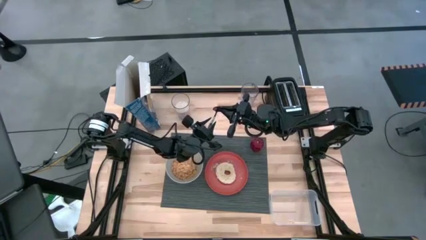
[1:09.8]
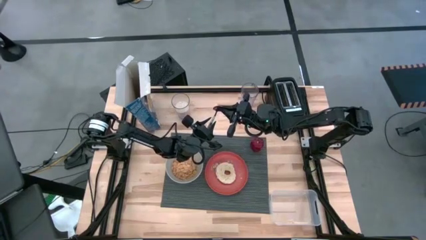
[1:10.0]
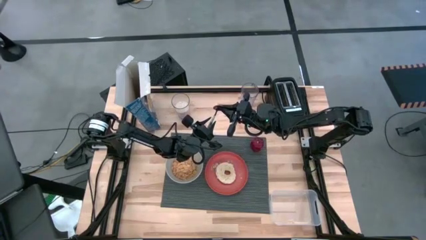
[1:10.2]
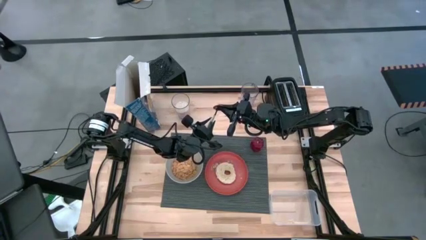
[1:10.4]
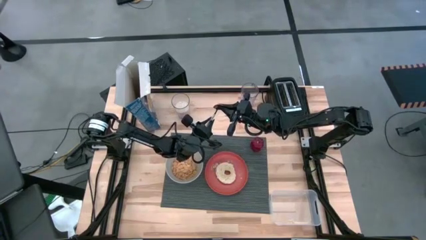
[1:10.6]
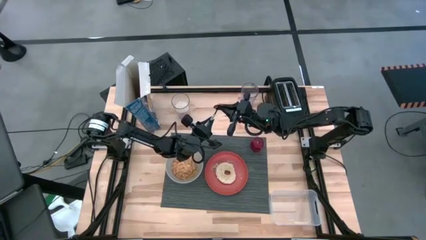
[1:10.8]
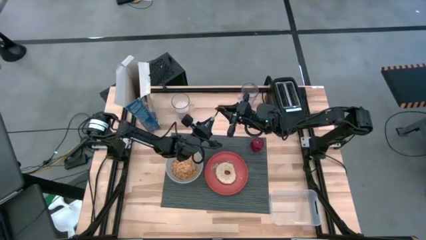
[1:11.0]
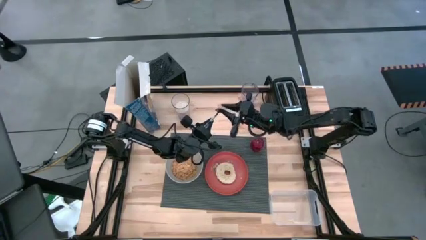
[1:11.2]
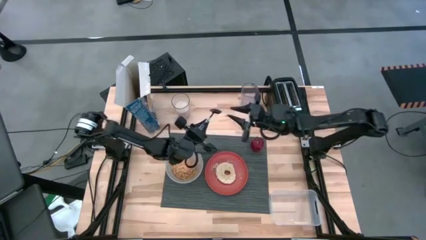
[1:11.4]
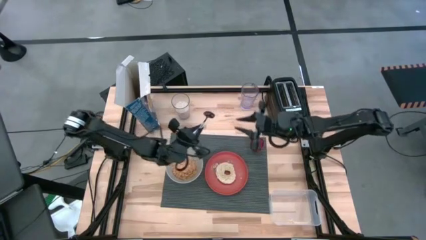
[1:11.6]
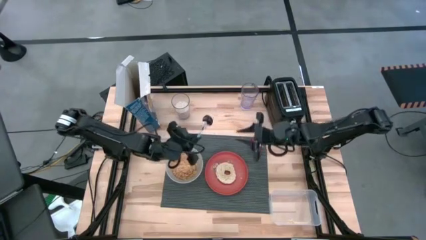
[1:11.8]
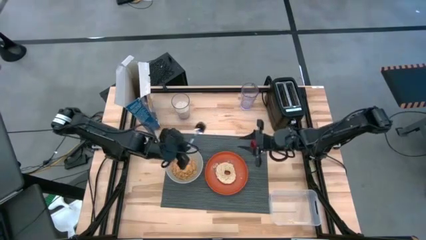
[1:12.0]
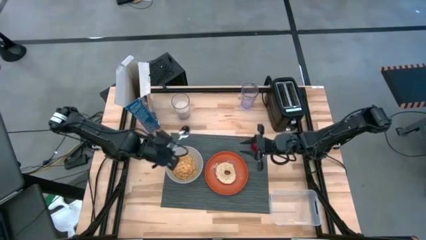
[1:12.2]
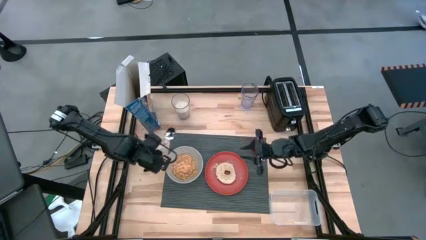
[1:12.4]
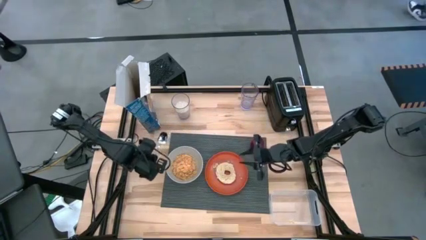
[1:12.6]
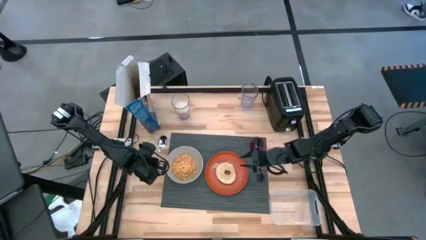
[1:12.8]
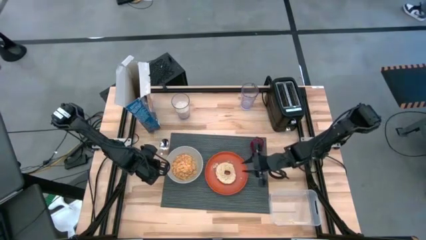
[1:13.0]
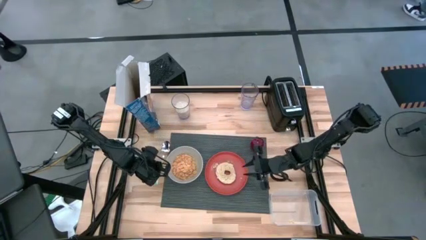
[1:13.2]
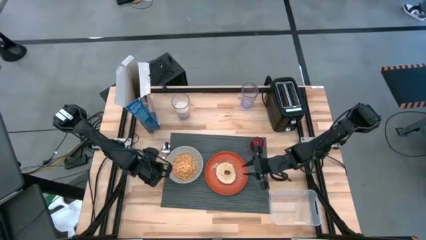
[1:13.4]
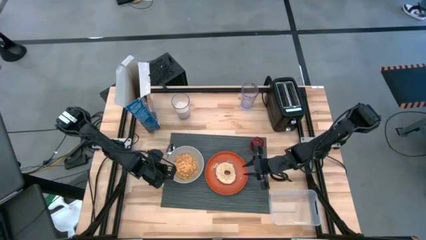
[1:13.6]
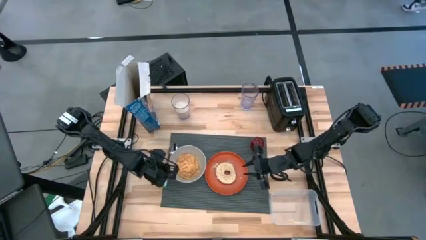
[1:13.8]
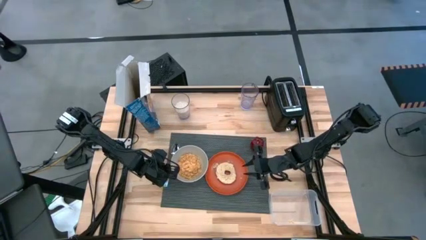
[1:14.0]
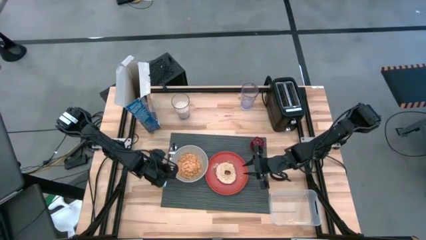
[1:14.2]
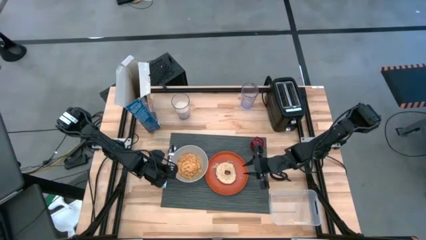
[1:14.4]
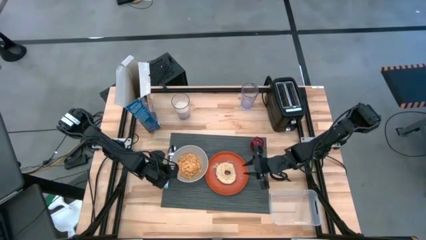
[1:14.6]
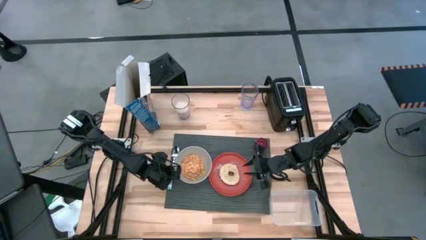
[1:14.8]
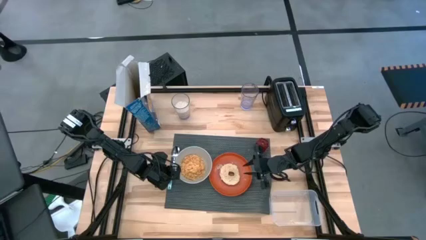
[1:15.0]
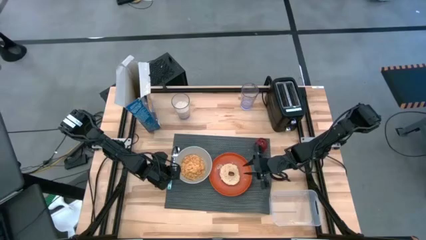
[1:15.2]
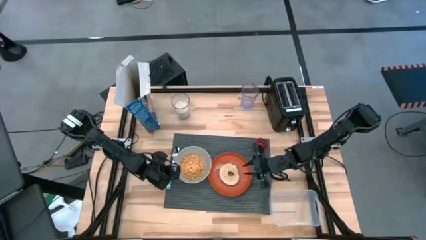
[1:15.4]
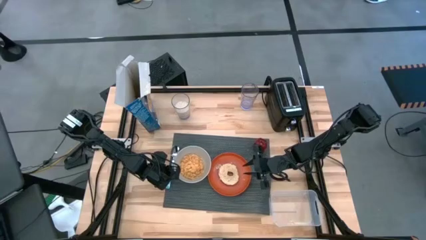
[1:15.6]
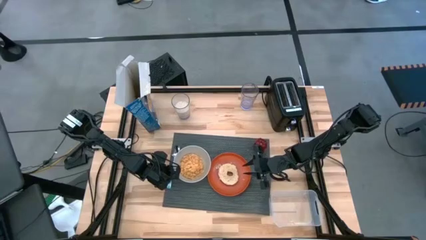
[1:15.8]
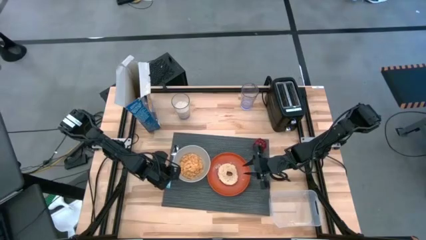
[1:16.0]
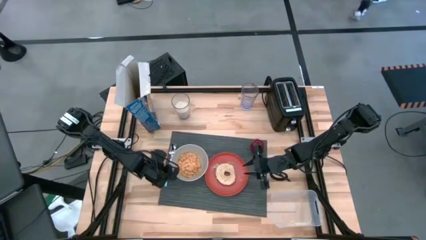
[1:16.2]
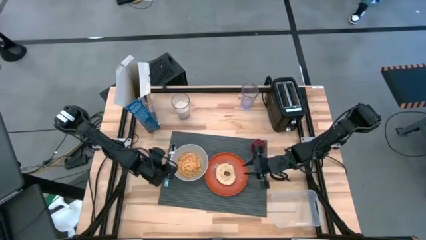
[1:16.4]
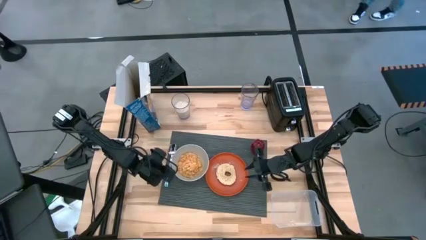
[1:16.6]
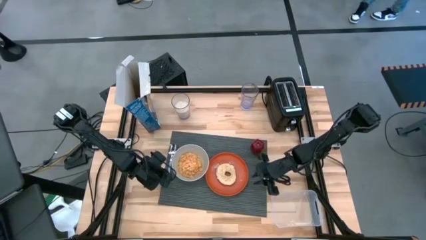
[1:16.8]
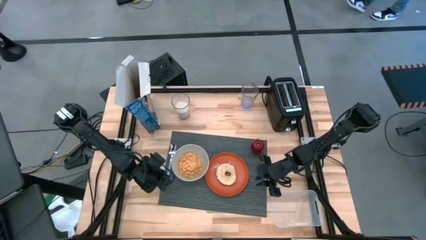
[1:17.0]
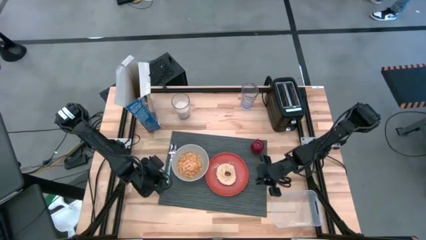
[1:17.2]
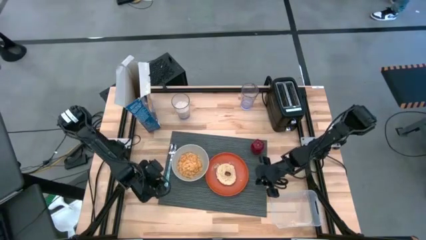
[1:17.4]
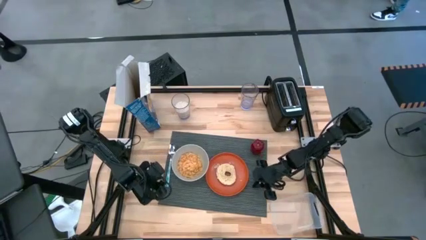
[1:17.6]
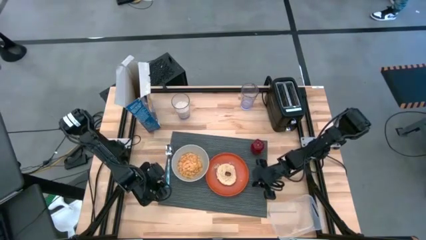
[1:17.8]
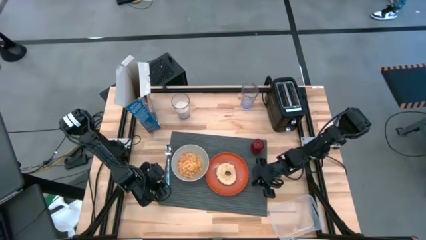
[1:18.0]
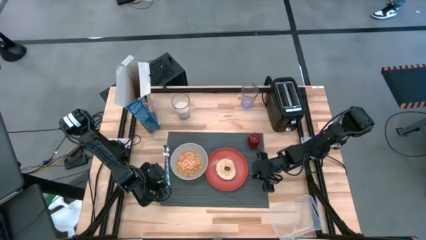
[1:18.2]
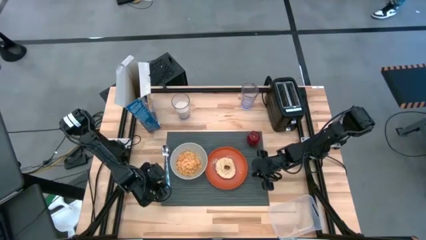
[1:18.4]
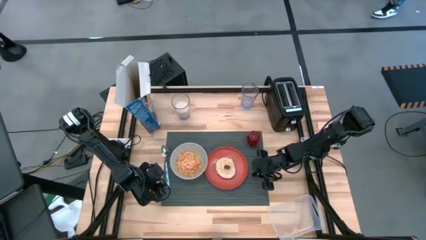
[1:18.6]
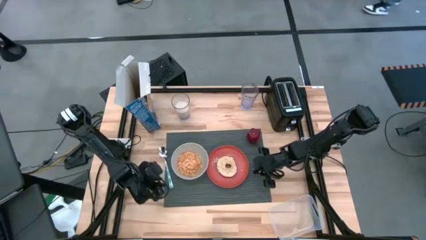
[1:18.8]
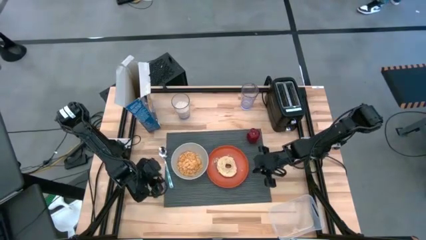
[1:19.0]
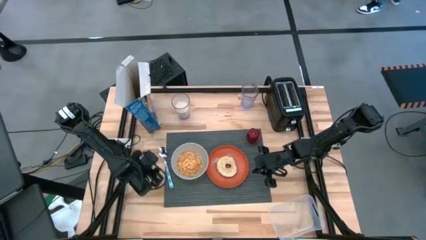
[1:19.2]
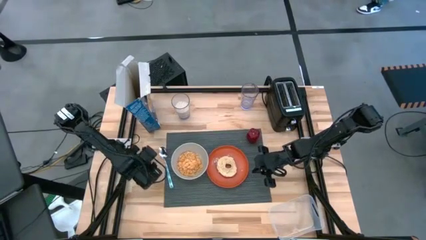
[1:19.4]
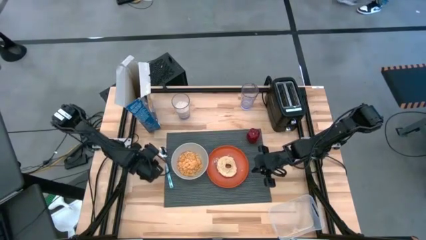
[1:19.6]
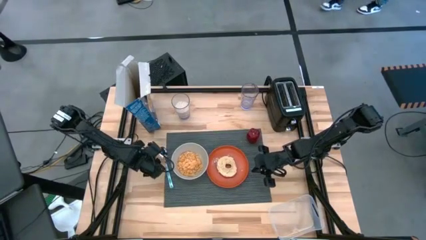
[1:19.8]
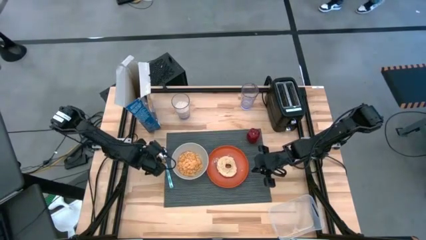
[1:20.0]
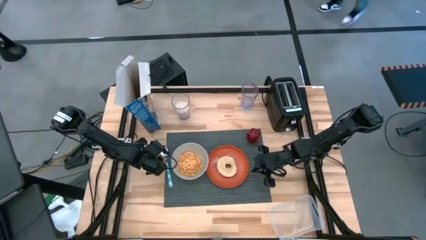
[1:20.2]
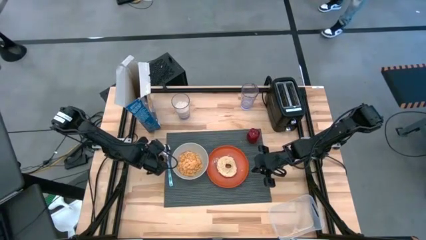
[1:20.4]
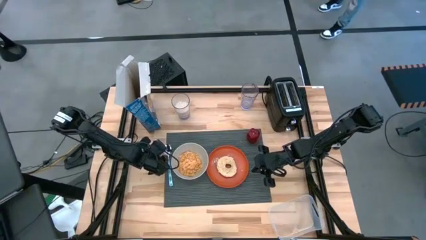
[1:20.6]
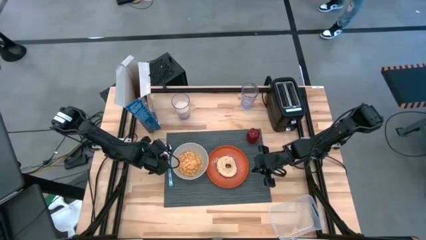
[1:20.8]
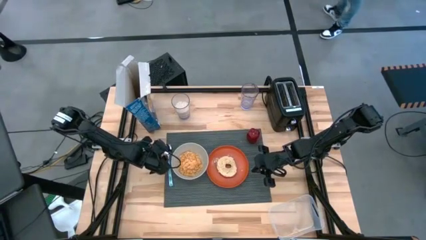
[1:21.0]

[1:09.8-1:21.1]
Task: Arrange a breakfast setting
Put the spoon beside the bowl

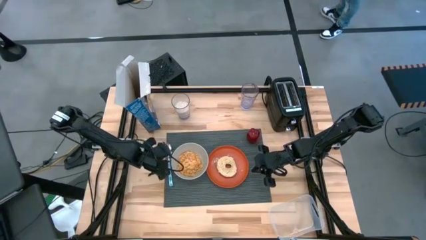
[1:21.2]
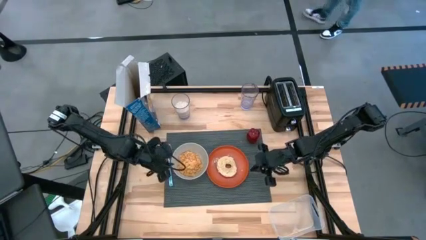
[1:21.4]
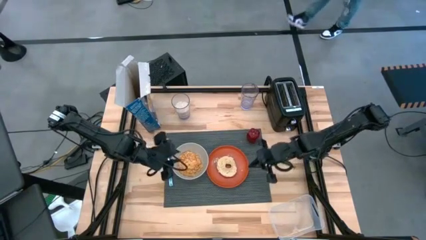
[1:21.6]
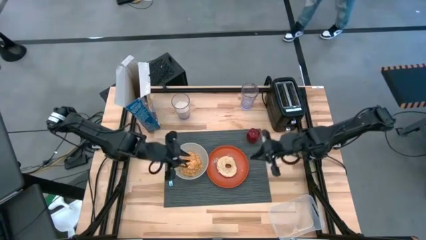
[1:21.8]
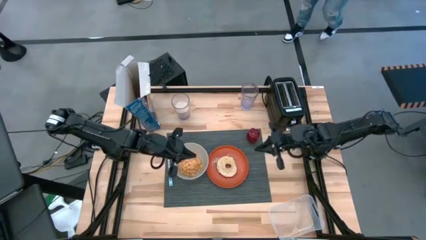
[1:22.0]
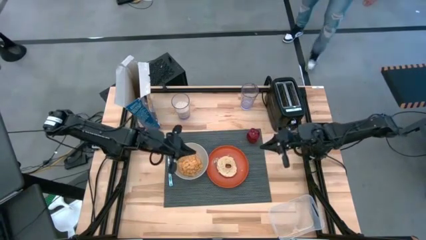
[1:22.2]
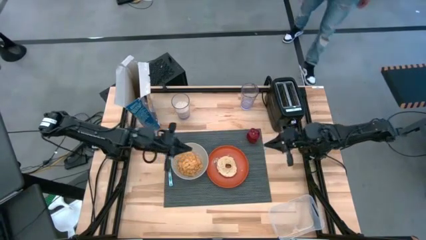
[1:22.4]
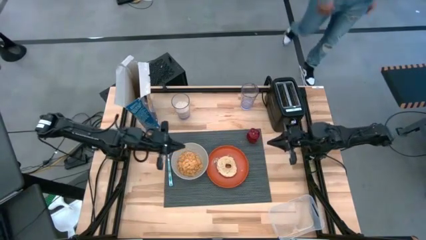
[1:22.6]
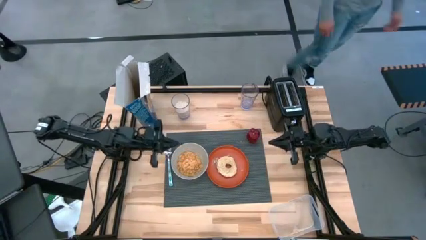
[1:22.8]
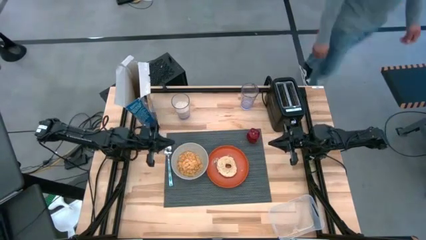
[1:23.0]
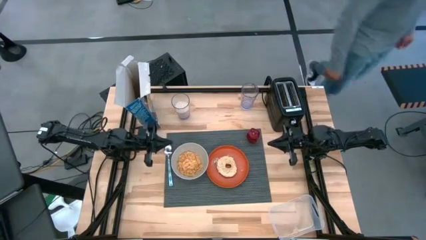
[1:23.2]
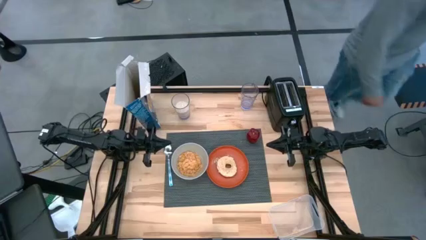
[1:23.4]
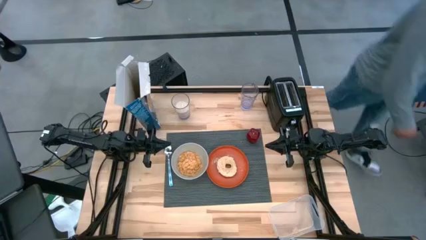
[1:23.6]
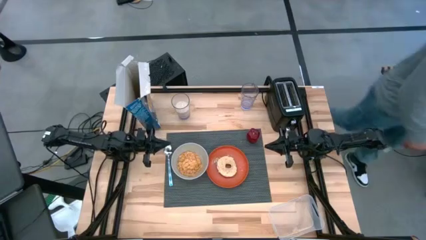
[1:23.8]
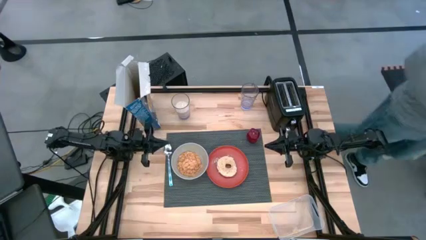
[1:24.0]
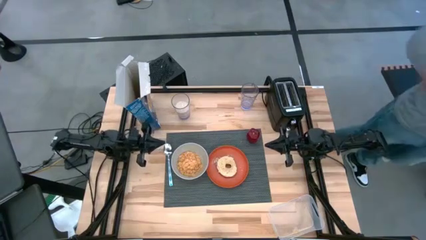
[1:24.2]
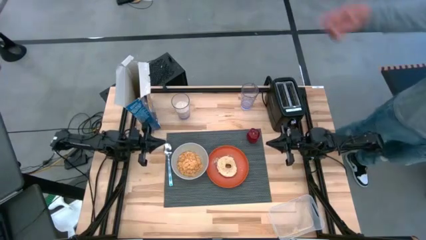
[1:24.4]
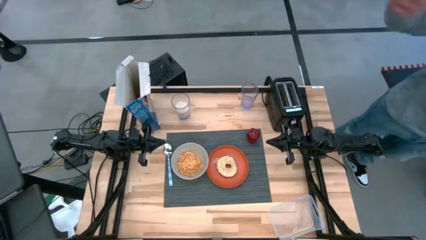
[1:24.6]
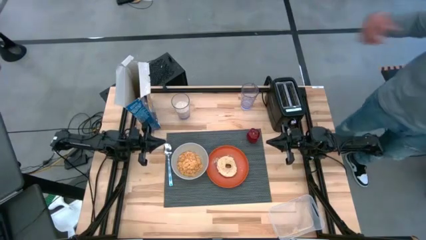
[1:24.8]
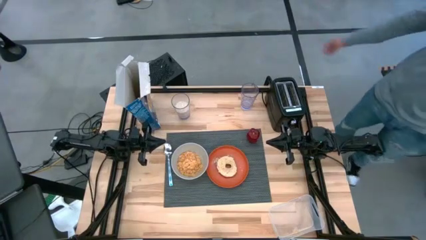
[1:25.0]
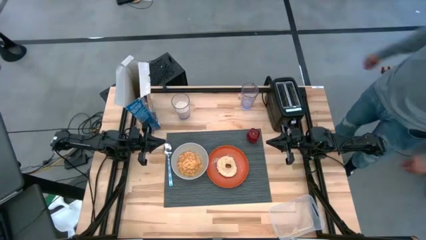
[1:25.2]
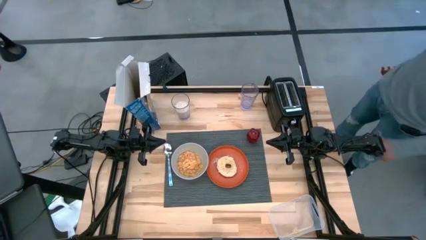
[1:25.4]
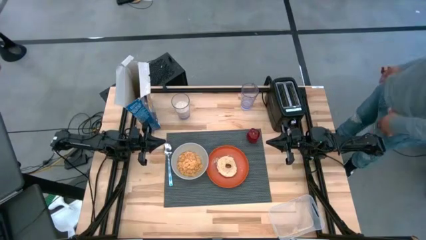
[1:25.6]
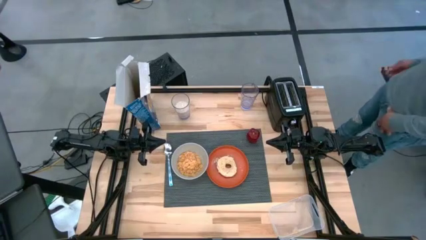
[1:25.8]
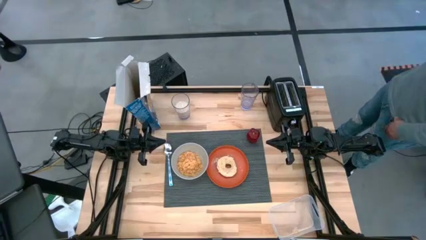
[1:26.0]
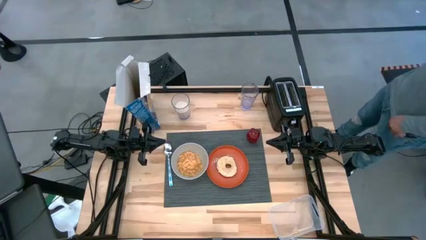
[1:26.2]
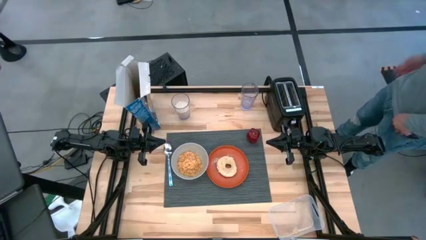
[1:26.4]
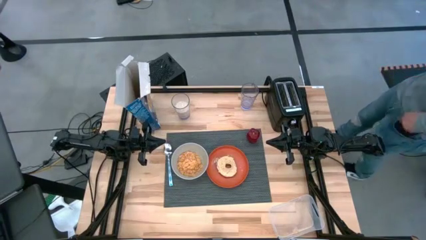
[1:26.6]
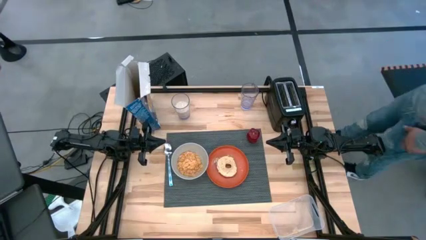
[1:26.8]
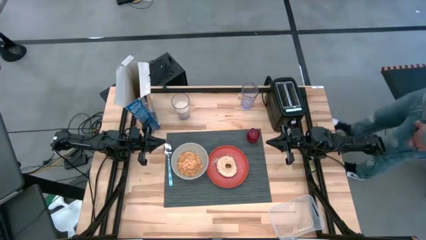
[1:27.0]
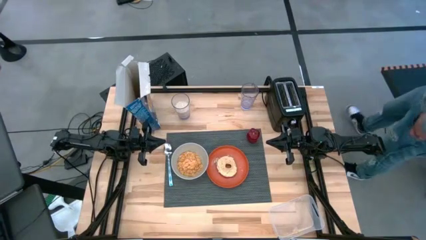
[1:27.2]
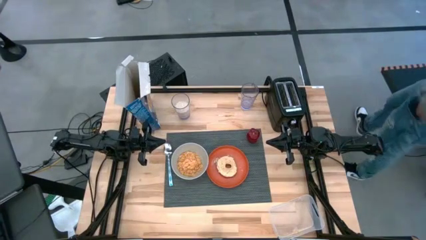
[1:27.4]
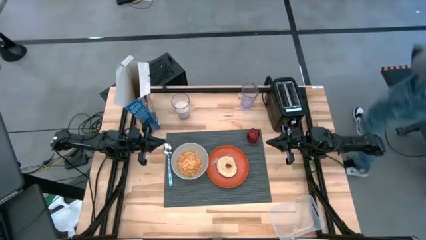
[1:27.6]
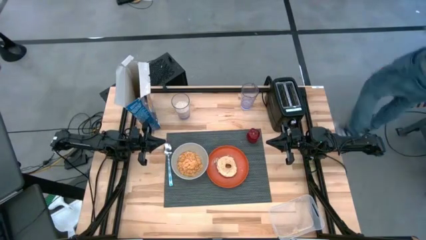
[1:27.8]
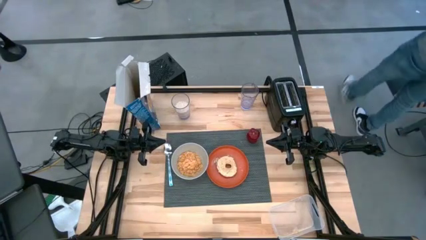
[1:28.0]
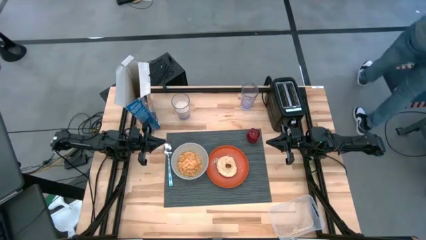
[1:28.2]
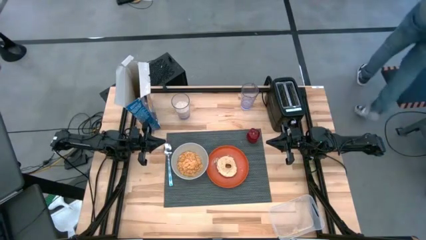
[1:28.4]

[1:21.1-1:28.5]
Return to Home position
